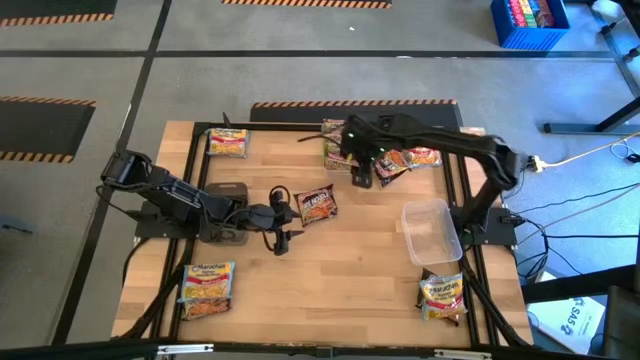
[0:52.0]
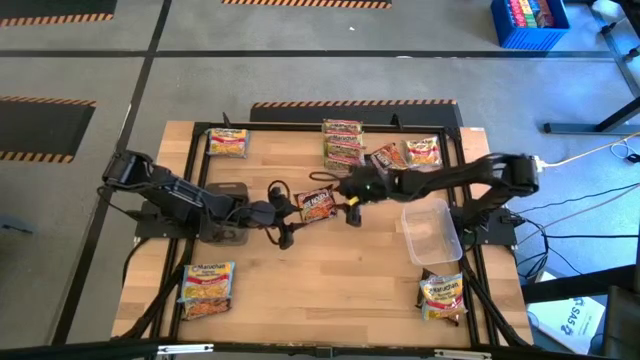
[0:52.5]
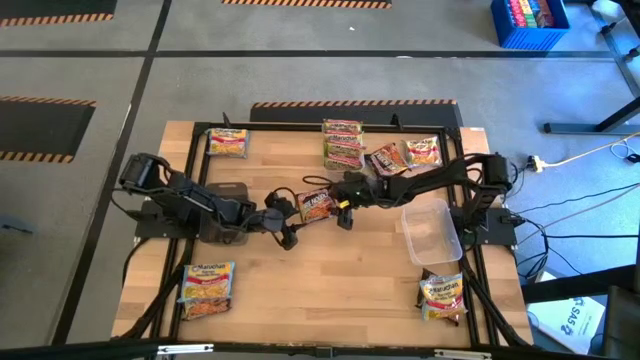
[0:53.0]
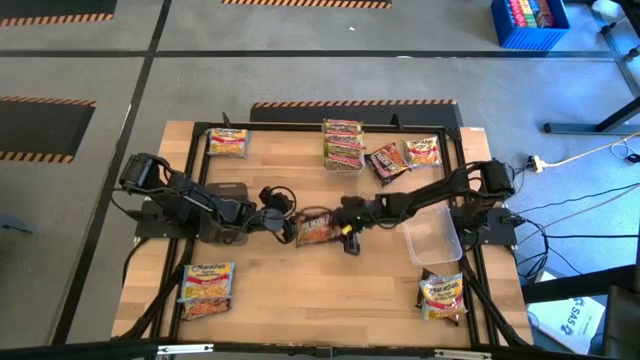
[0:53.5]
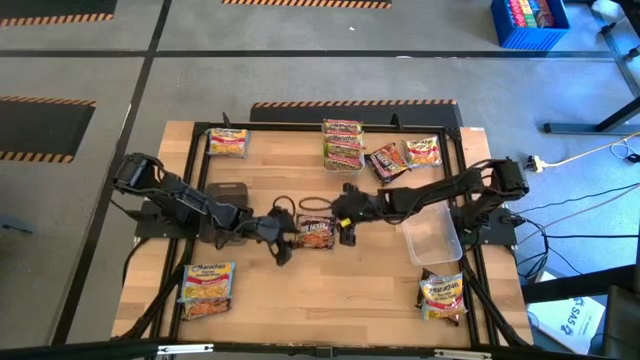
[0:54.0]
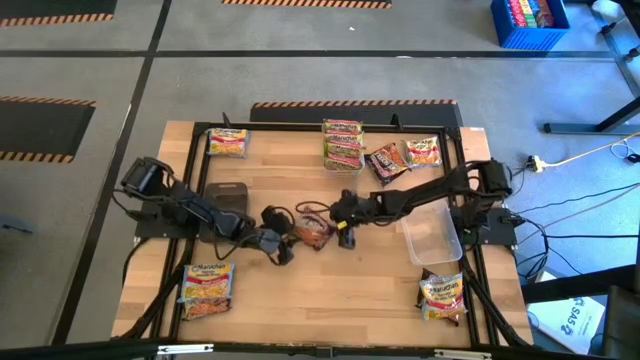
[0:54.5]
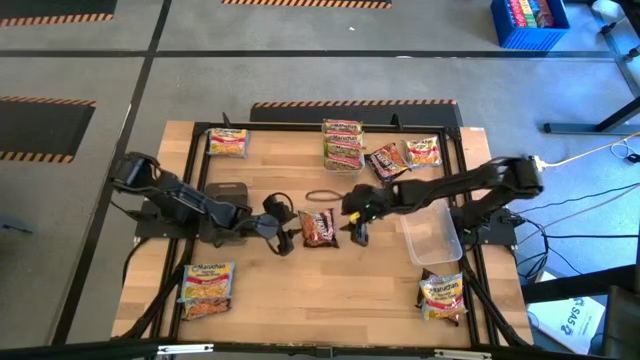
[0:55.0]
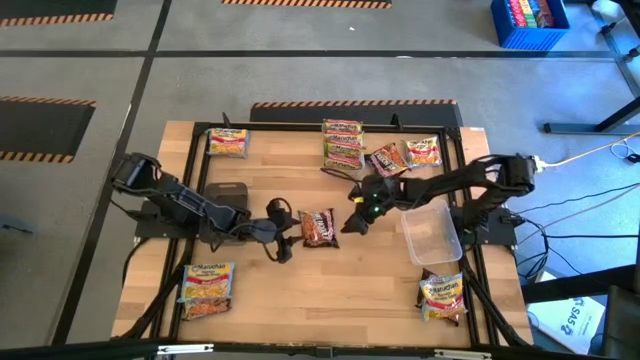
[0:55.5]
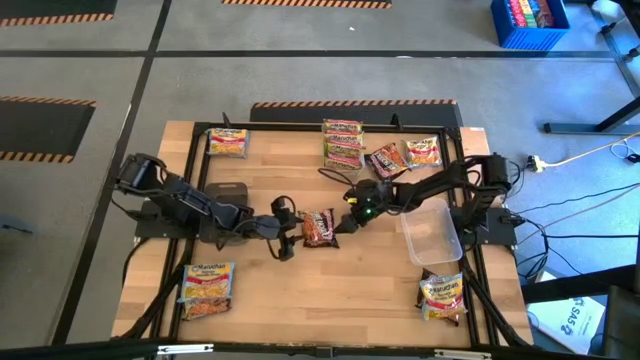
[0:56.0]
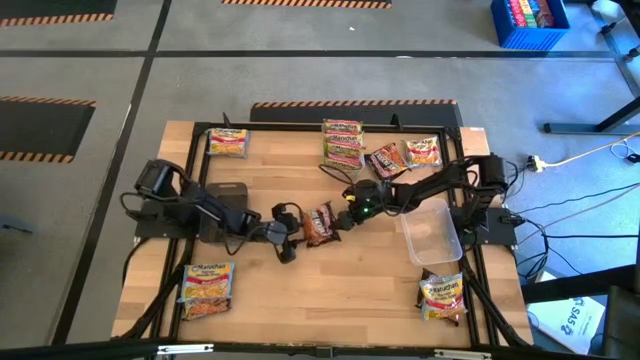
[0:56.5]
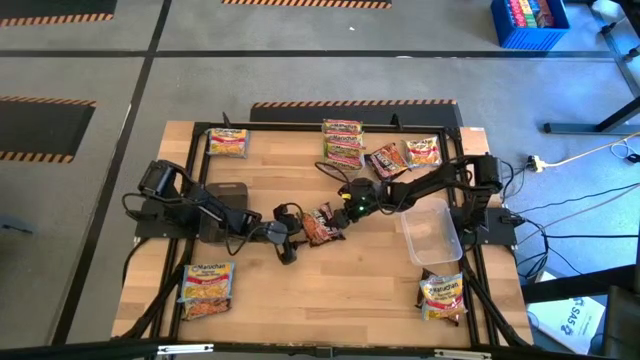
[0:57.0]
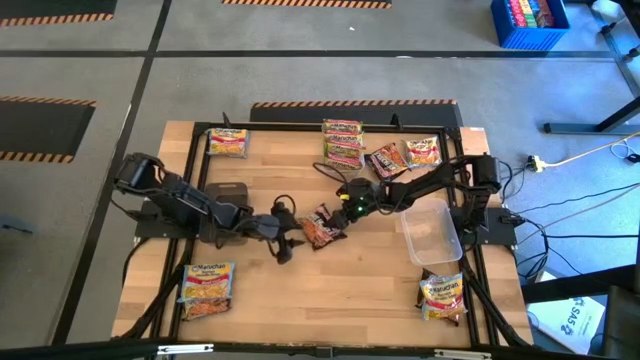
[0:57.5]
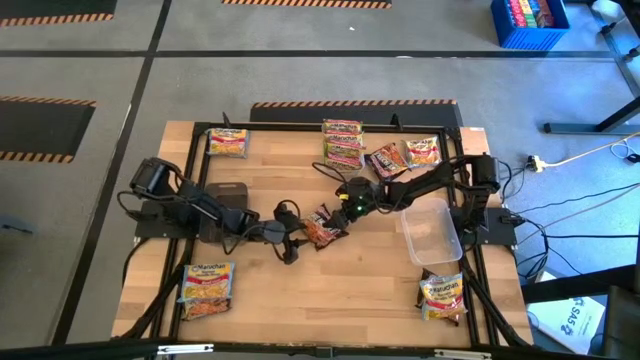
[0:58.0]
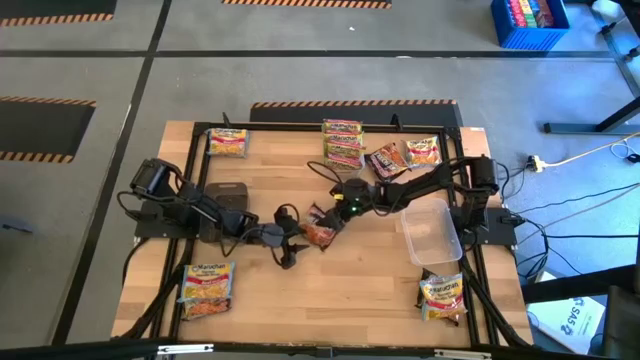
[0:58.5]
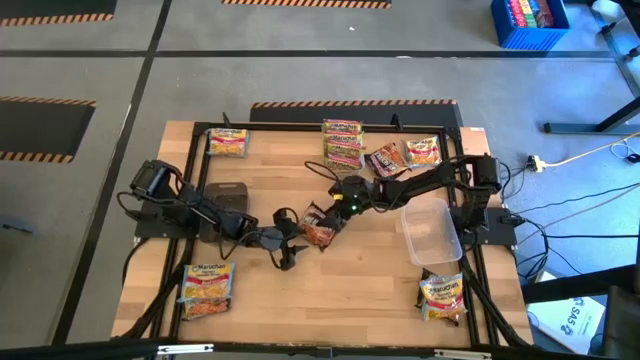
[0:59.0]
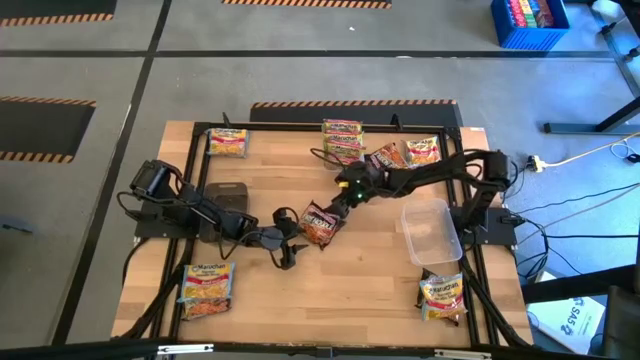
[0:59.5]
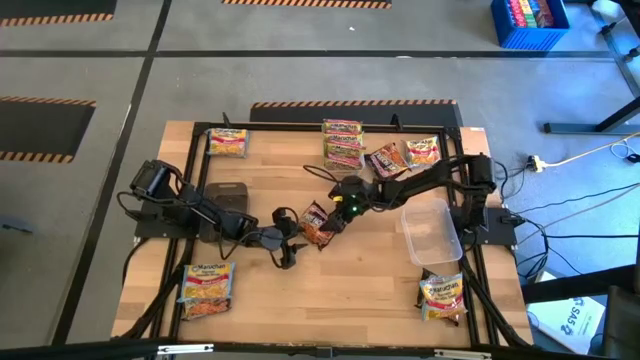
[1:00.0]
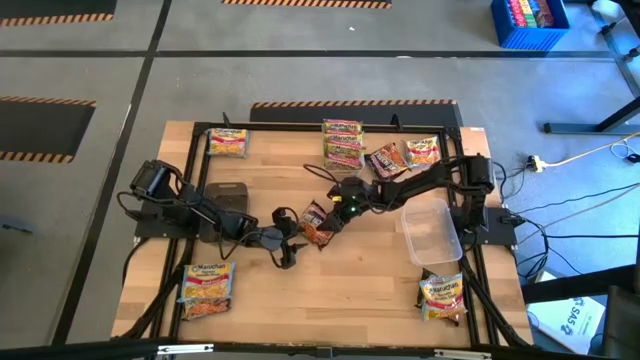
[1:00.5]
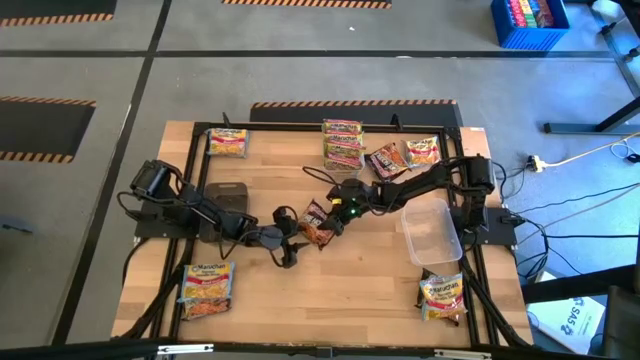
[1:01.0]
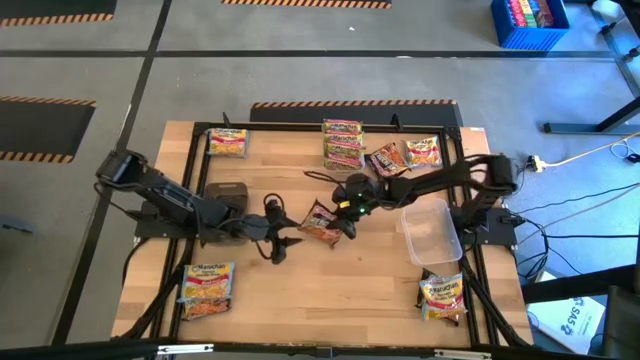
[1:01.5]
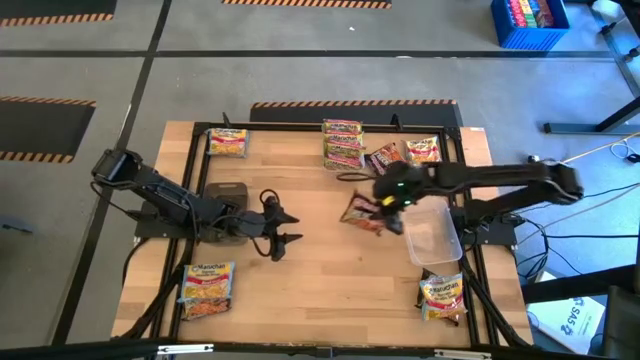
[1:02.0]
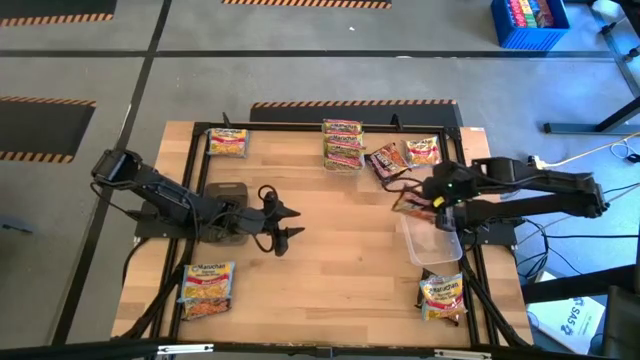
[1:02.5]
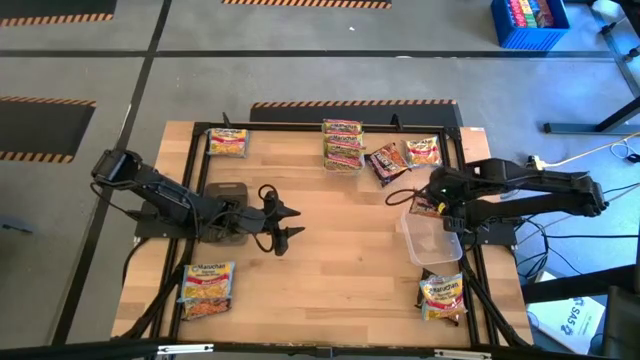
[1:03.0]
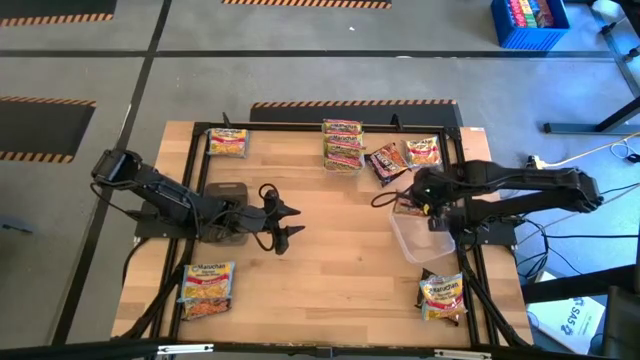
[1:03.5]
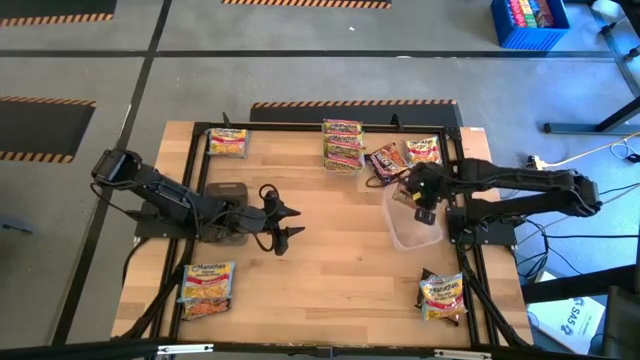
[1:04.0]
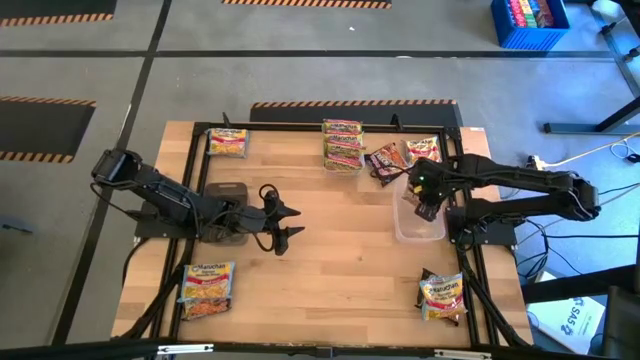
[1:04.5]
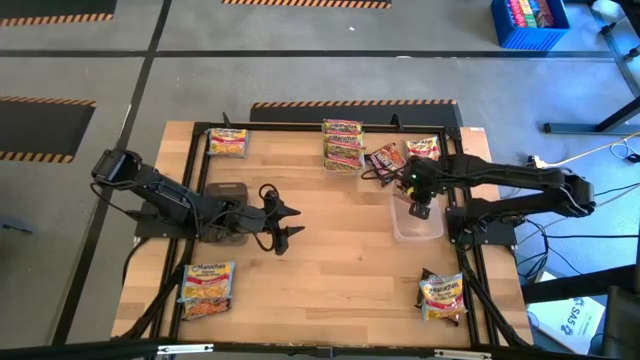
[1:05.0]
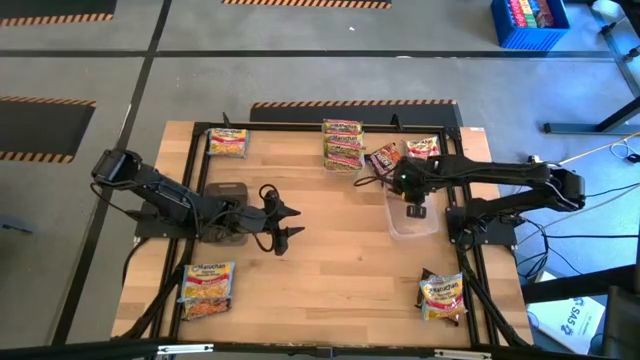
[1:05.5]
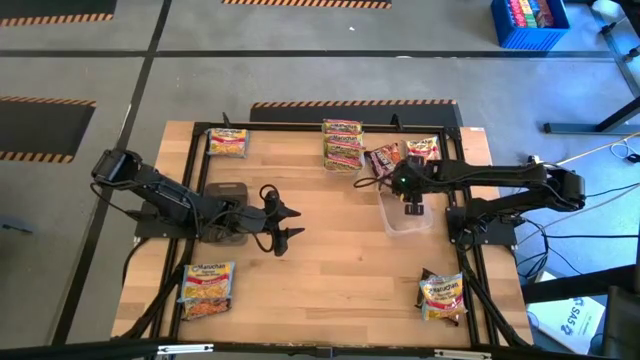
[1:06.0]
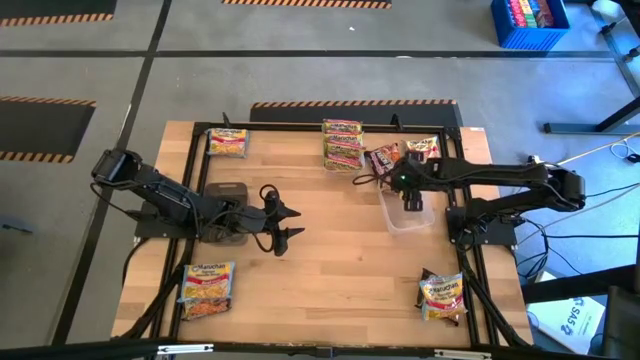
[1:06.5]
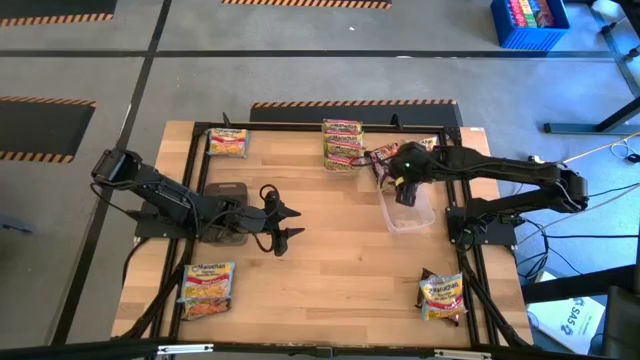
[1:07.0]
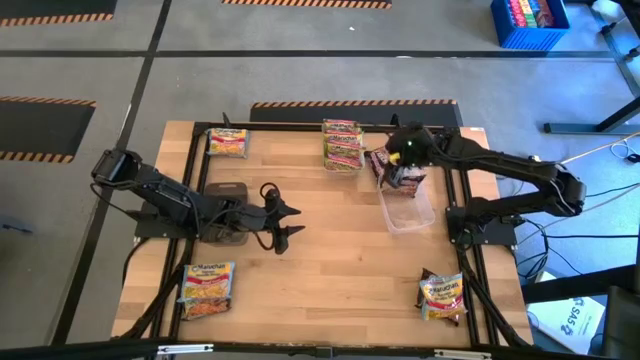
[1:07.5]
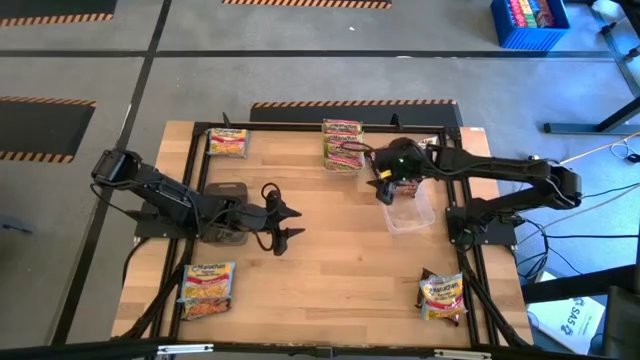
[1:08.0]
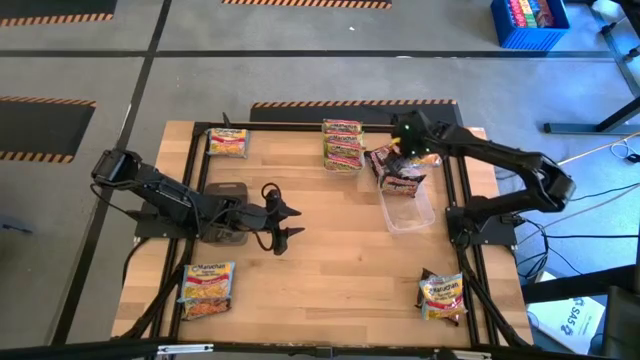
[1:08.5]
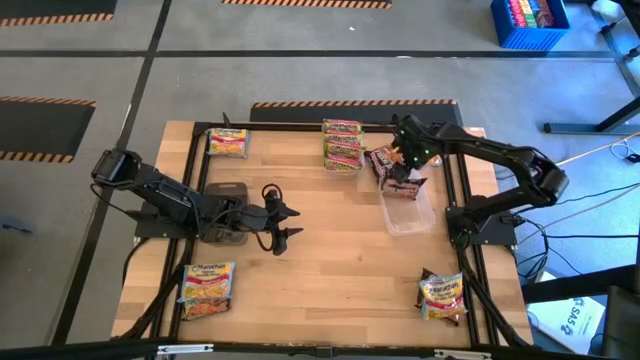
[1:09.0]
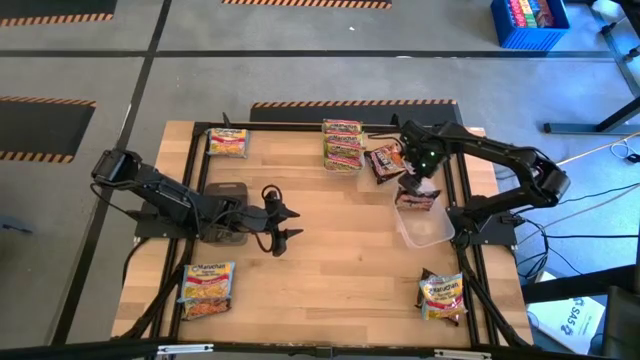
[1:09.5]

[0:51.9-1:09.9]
Task: Sort Maruchan noodles
Put the middle black noodle pack into the bottom transparent bin

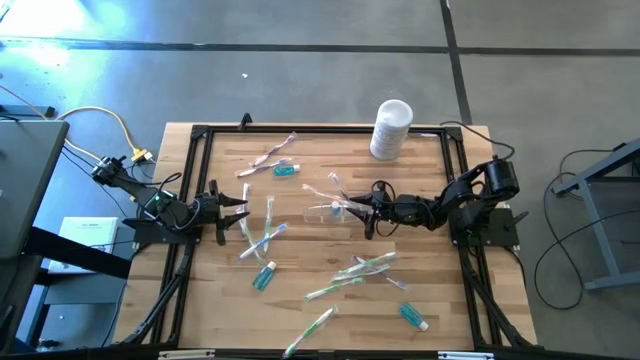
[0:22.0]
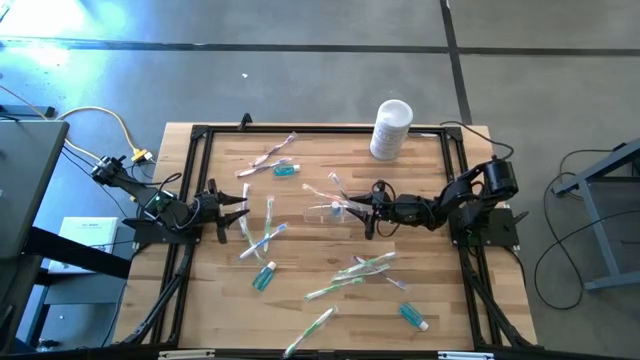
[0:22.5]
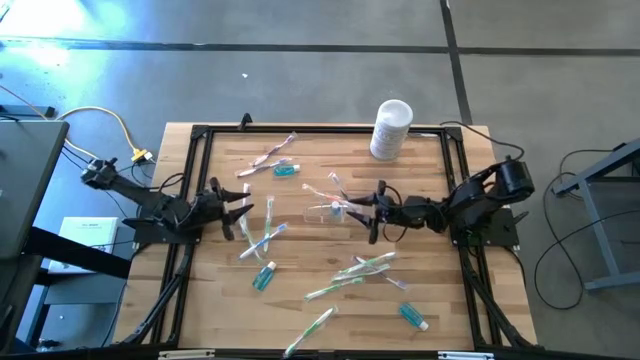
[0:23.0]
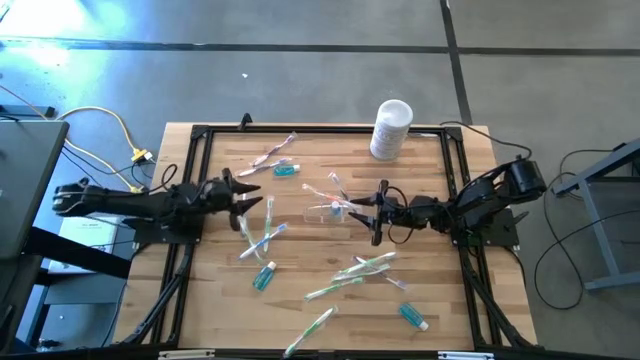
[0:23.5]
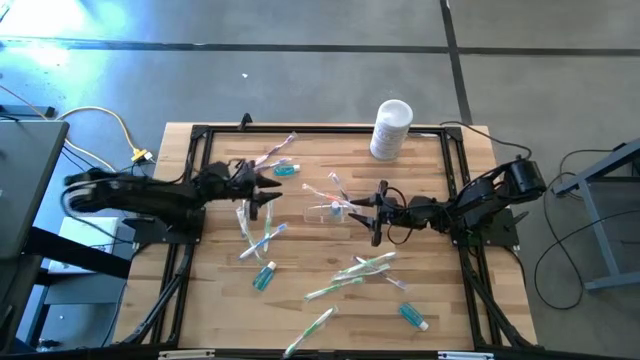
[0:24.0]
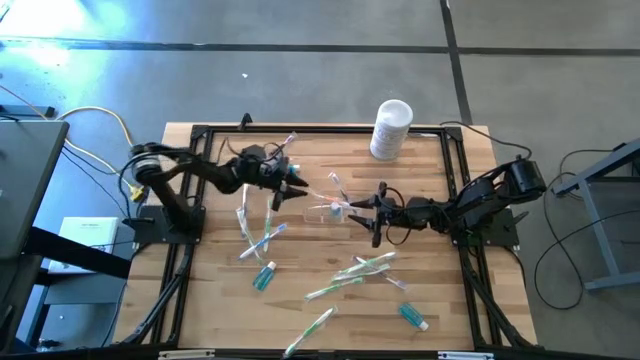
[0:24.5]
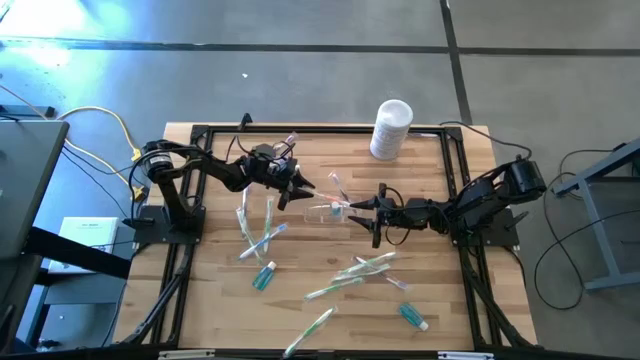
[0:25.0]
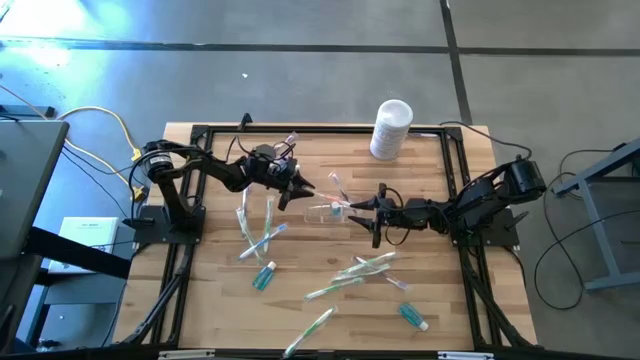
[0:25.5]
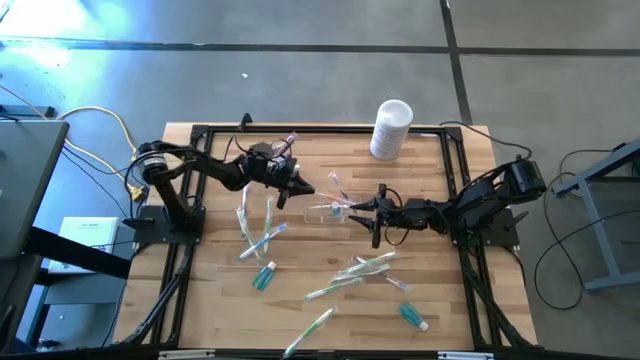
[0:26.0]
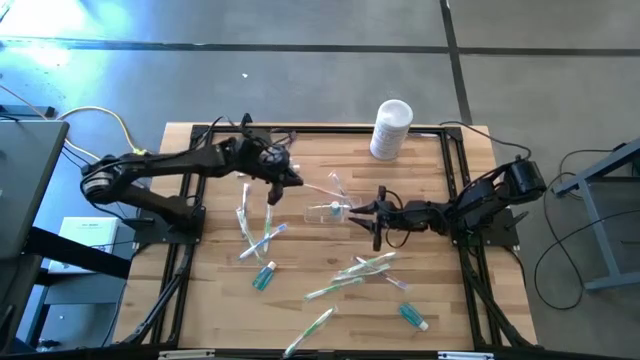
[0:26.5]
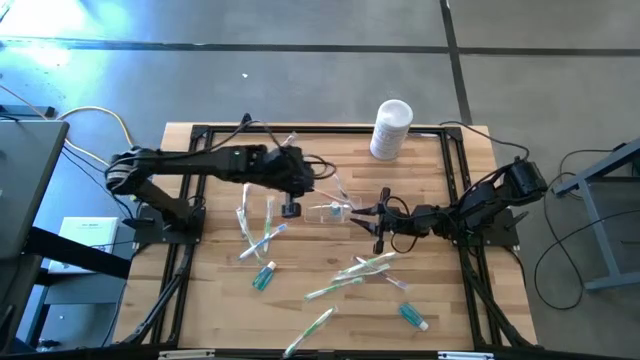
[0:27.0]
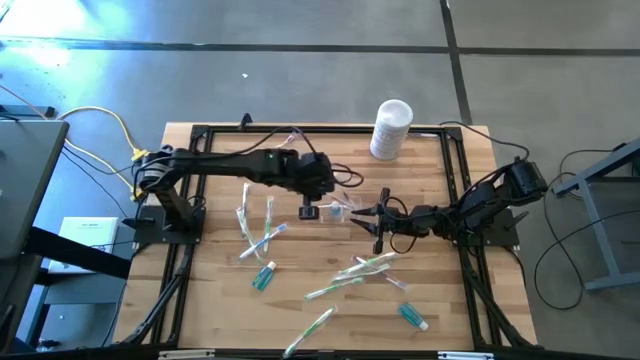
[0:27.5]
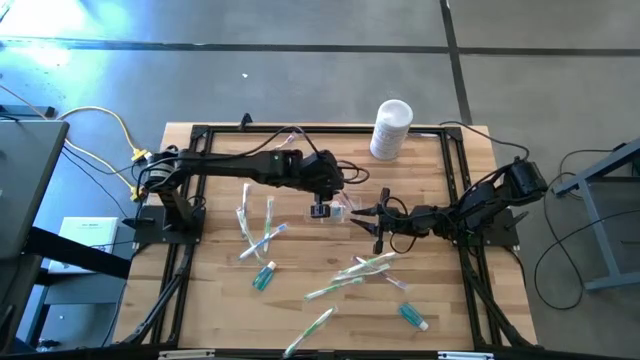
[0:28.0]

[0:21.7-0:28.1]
Task: Pick & Place toothbrushing station
Put the orange toothbrush into the transparent organizer
